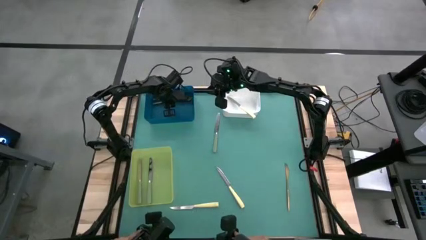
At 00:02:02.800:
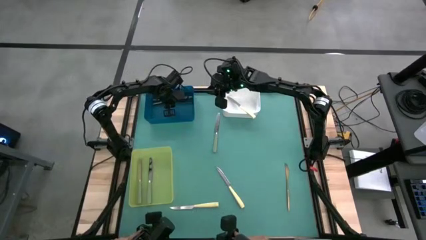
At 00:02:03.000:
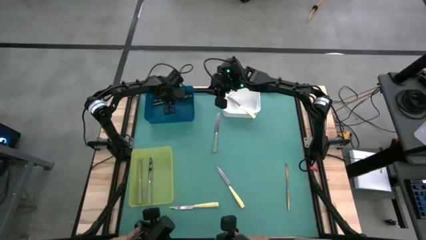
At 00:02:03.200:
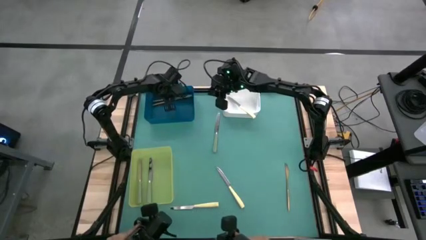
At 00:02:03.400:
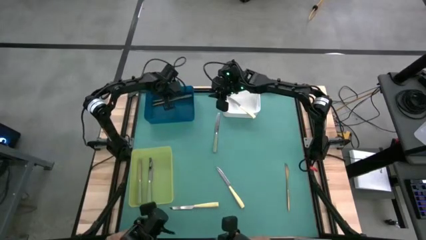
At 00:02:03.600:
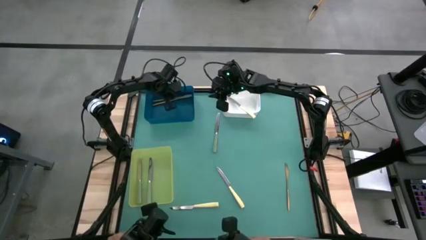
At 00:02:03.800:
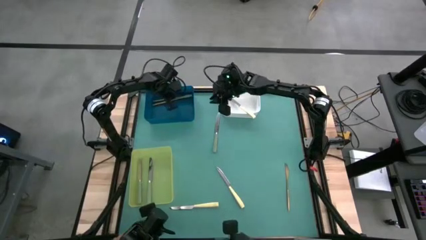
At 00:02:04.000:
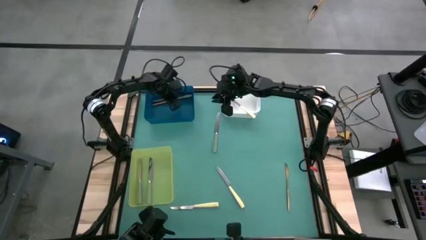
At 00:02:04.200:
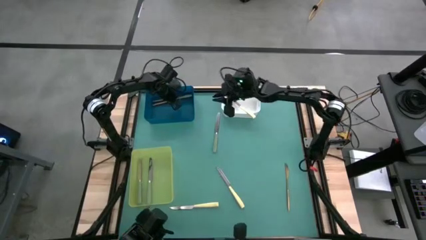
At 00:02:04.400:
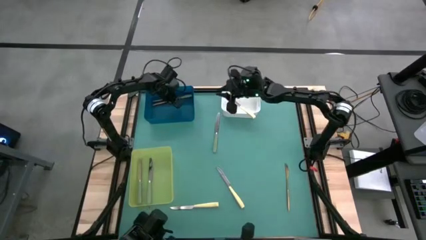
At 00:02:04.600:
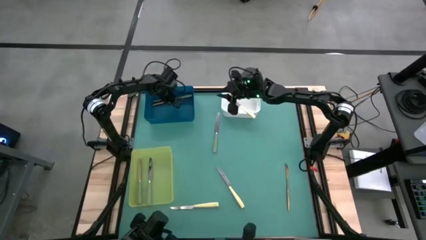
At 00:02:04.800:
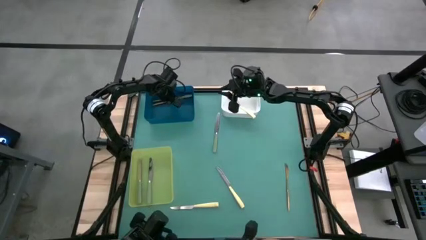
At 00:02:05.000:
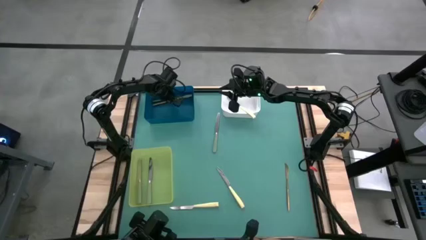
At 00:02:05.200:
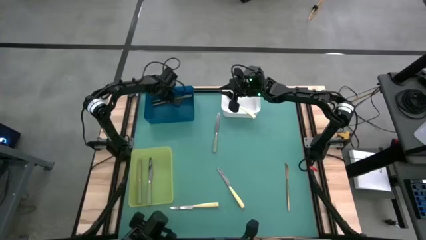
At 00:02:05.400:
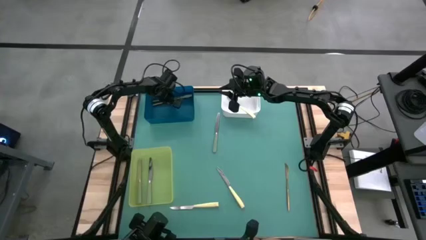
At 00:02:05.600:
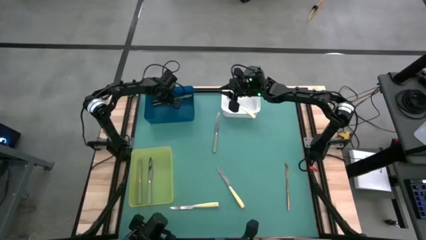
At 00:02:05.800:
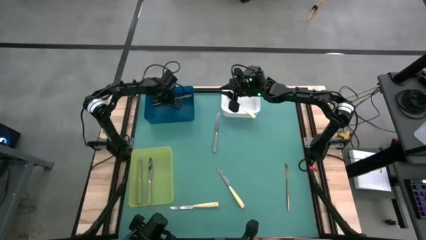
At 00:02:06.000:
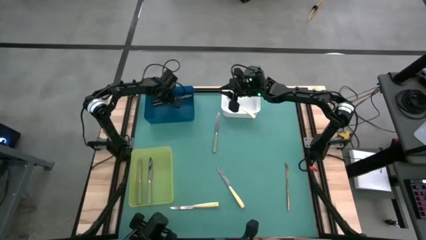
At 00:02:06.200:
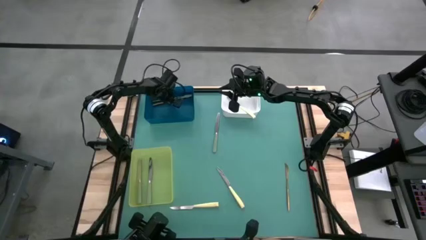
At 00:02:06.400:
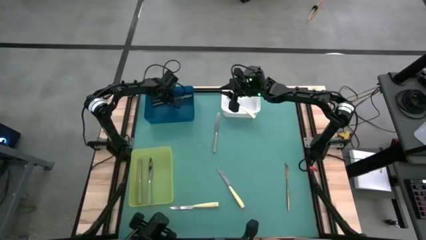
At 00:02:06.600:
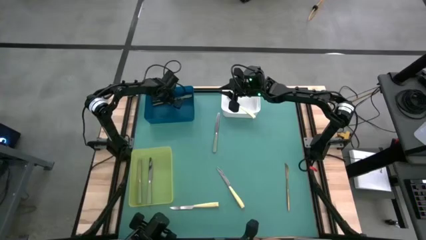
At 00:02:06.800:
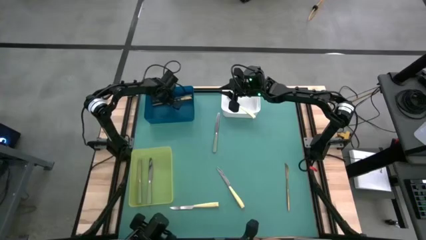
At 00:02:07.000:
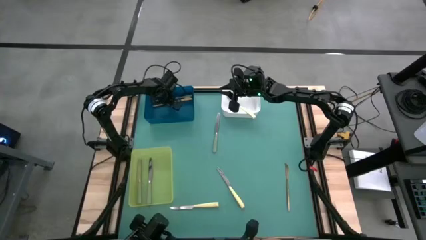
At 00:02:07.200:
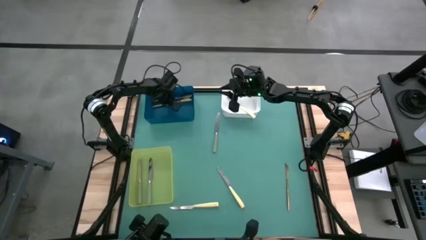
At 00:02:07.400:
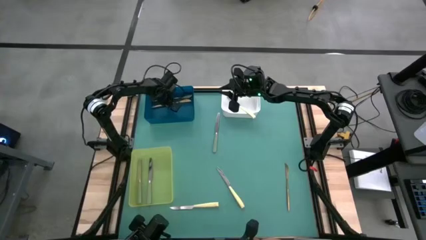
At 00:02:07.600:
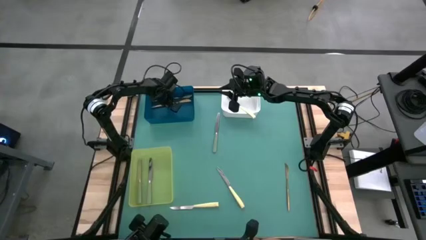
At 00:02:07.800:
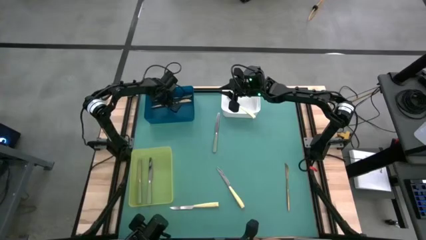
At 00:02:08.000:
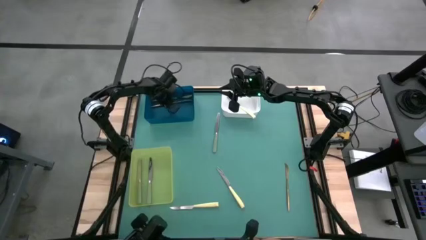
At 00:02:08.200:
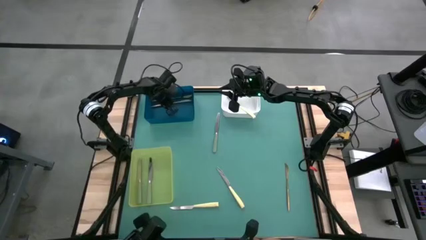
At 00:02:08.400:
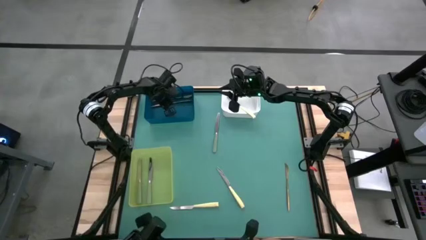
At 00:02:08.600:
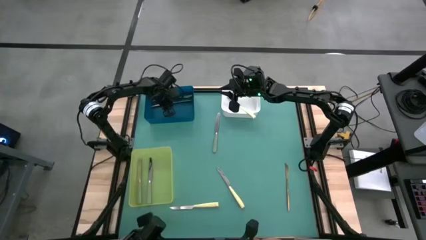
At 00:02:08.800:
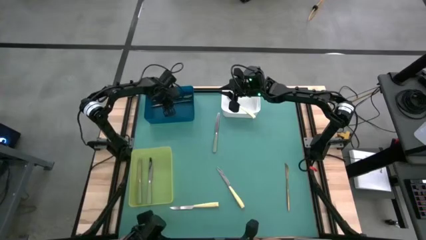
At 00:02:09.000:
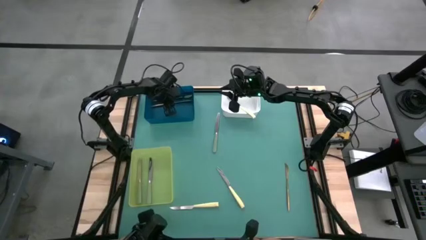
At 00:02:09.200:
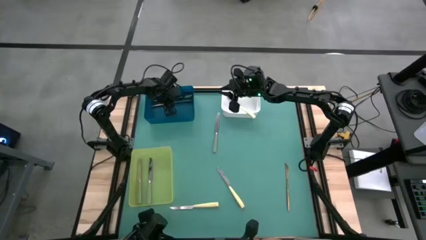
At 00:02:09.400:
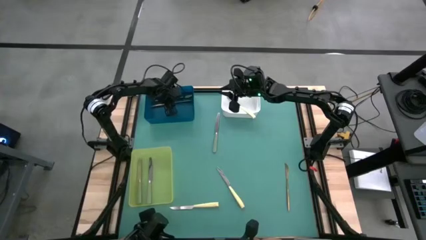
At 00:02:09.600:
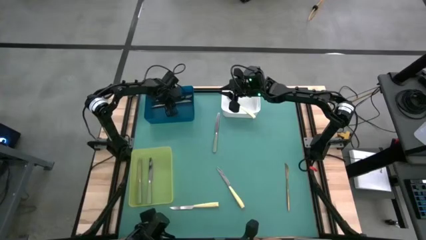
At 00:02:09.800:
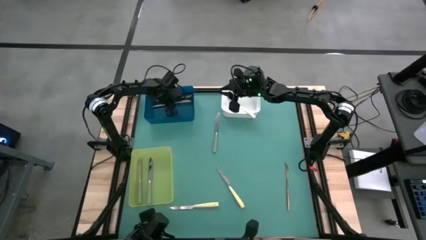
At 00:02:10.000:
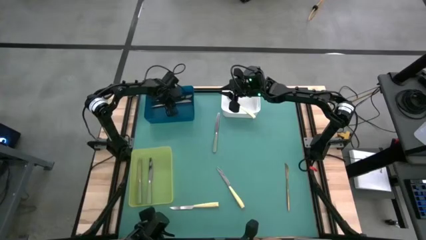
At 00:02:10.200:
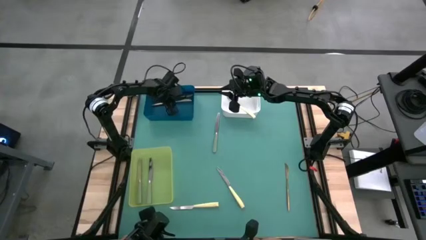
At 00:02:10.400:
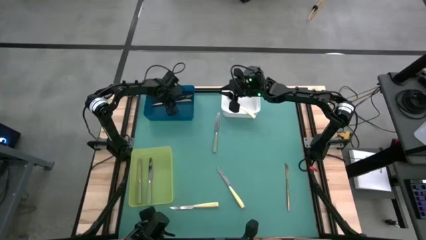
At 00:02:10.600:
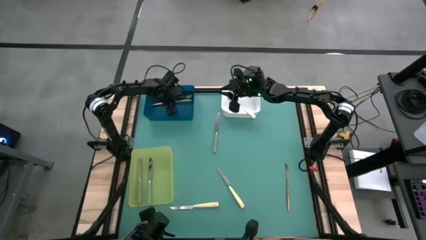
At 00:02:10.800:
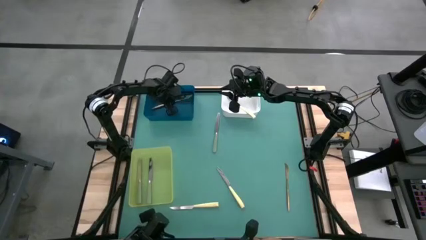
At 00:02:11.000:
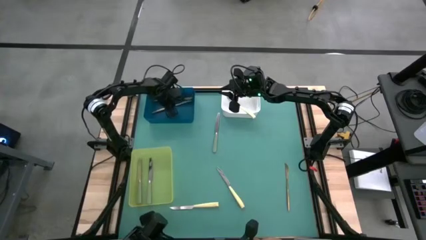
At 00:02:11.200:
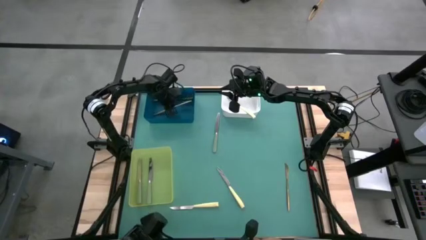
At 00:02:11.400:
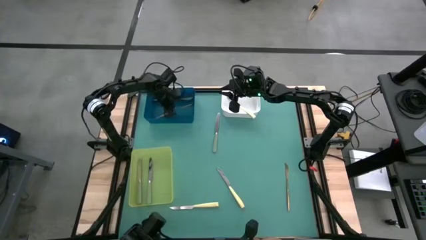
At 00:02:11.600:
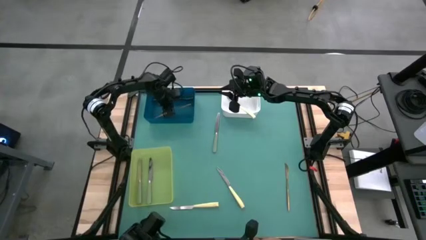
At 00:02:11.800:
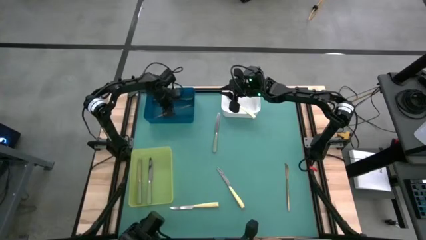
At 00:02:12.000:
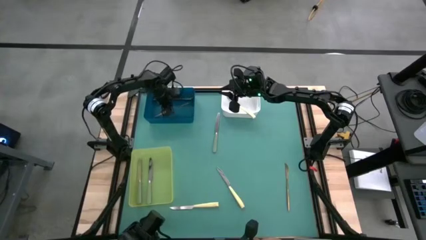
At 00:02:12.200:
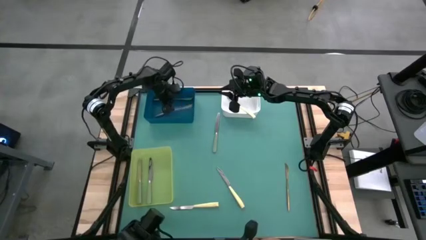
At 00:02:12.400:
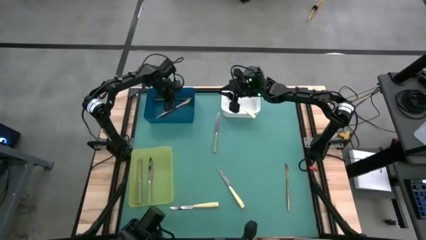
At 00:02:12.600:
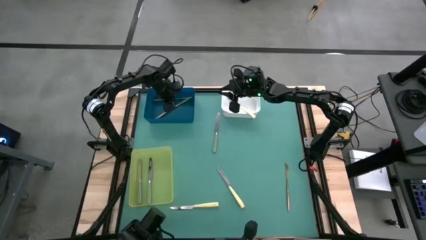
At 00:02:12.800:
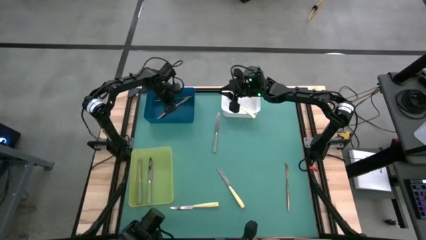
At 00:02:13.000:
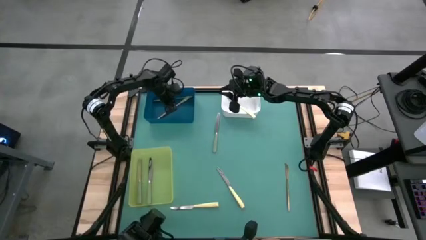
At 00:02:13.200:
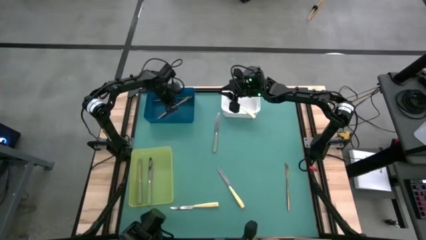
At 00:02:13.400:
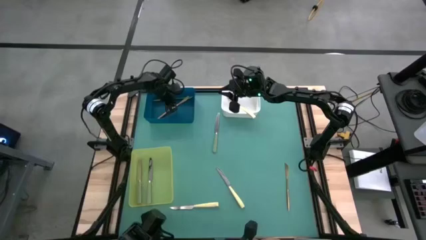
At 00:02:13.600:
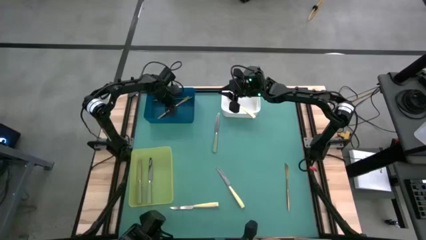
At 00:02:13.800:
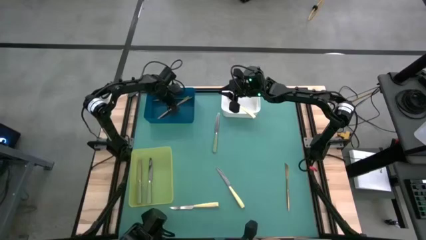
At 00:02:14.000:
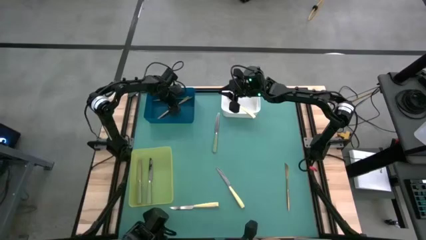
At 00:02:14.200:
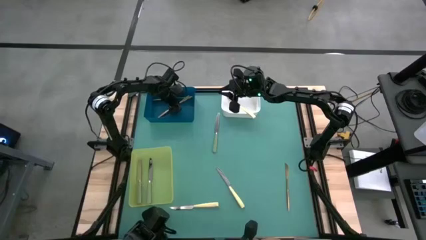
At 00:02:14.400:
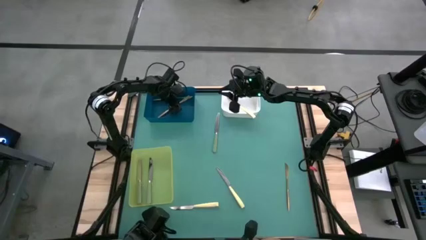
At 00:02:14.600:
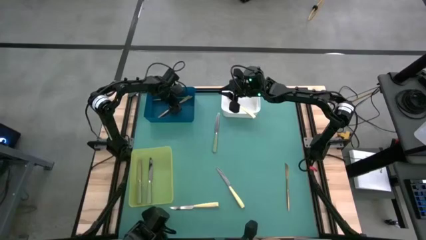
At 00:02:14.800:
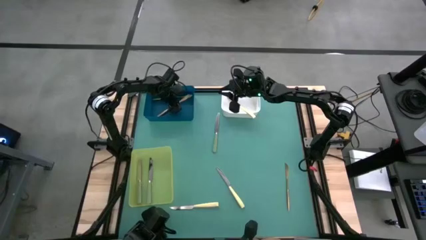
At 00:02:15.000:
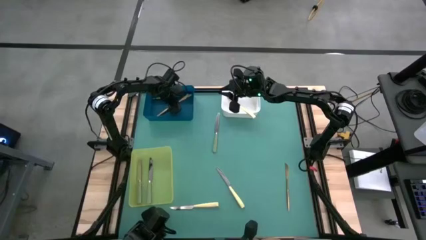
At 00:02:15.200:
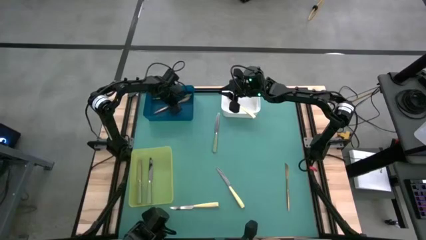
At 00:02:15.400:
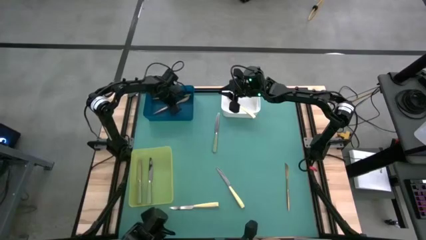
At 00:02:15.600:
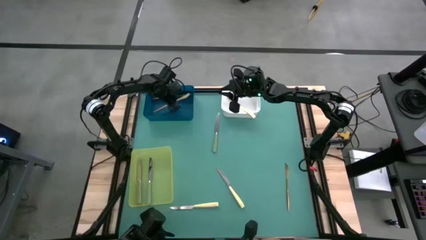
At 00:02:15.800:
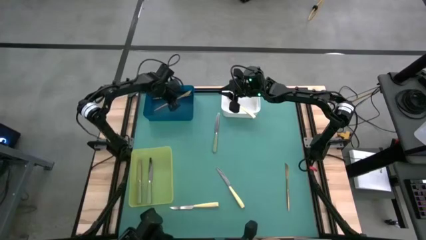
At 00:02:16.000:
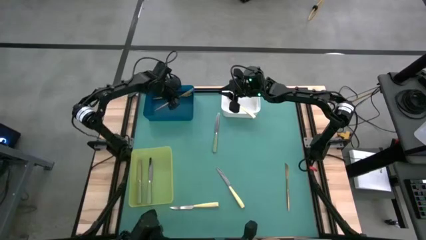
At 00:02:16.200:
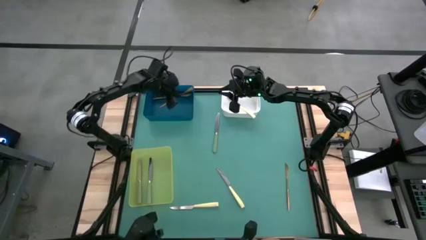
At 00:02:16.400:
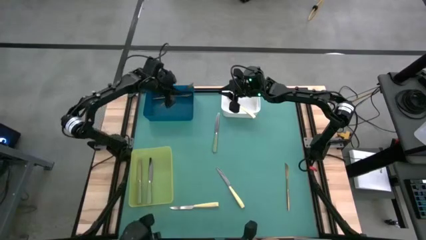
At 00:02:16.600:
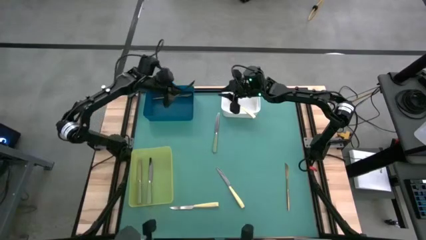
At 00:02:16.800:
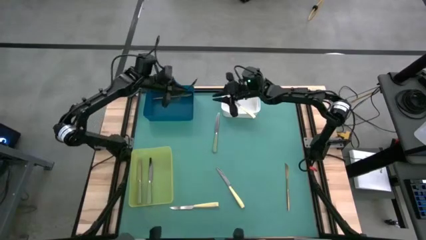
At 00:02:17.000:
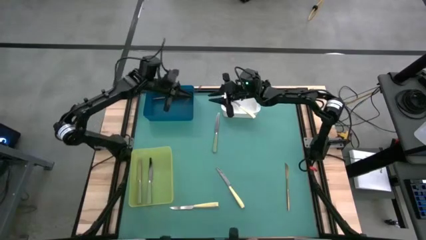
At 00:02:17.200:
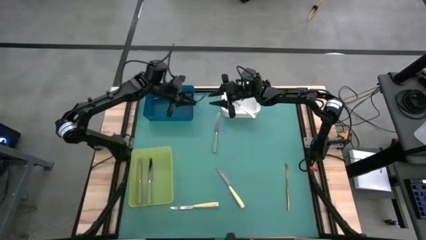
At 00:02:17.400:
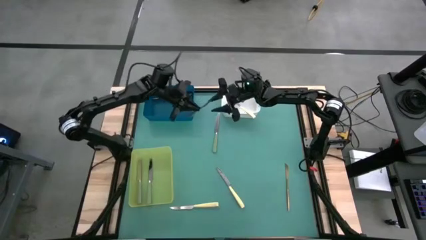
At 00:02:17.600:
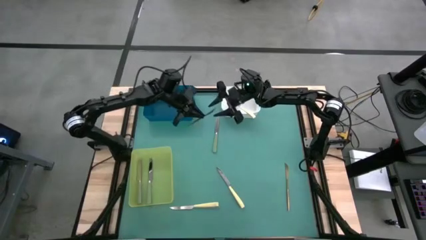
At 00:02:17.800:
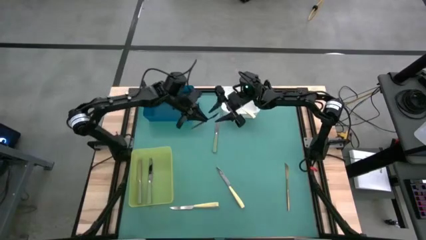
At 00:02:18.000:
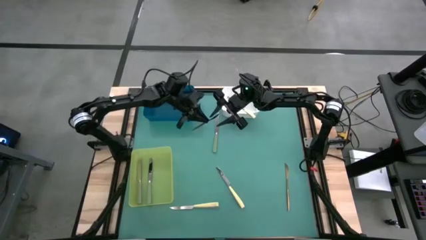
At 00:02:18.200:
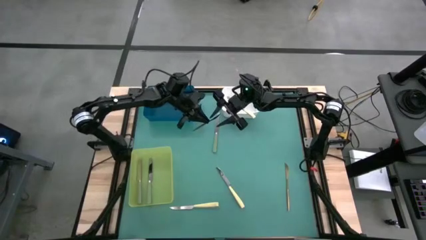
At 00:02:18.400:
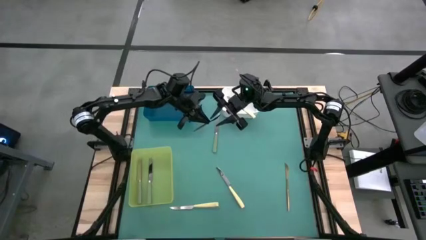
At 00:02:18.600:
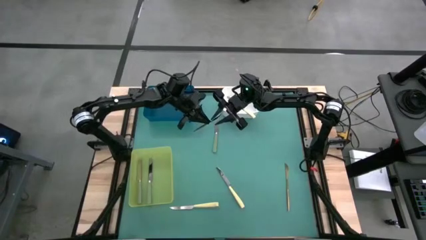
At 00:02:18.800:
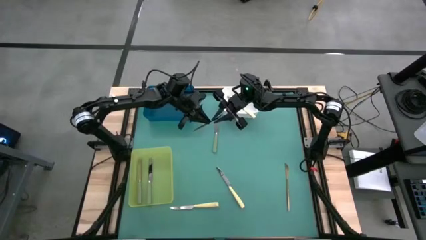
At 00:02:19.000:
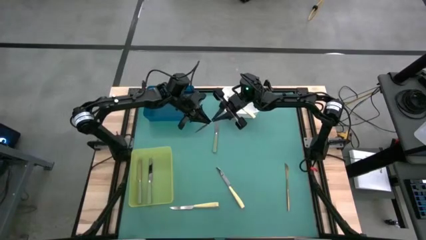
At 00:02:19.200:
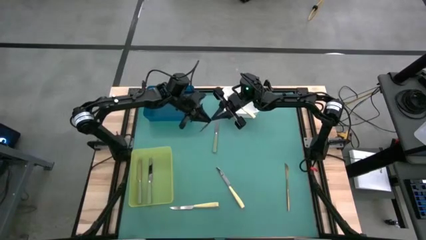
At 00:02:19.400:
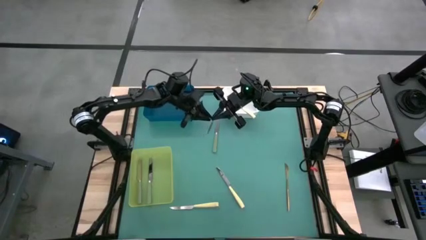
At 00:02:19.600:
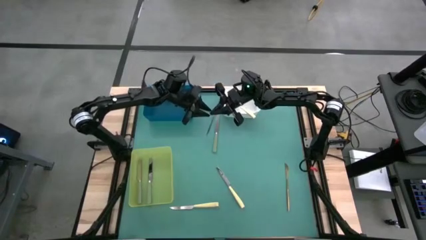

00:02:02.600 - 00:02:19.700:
Task: Sort silverware by color (type)
Put the left gold knife into the blue bin
